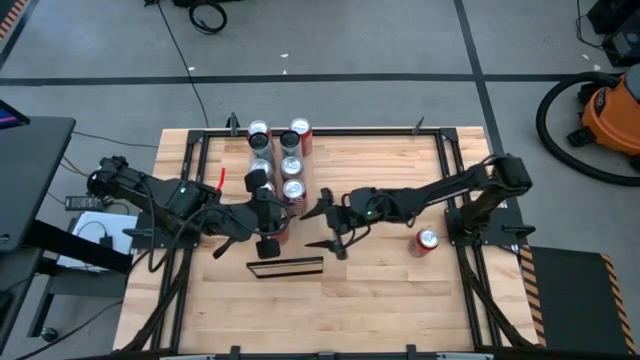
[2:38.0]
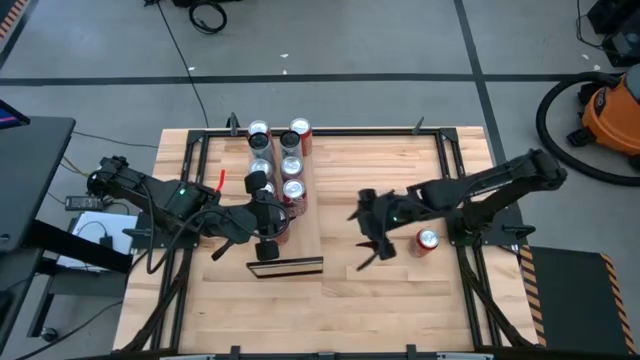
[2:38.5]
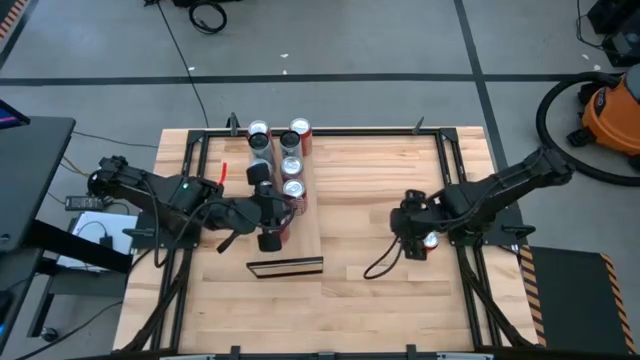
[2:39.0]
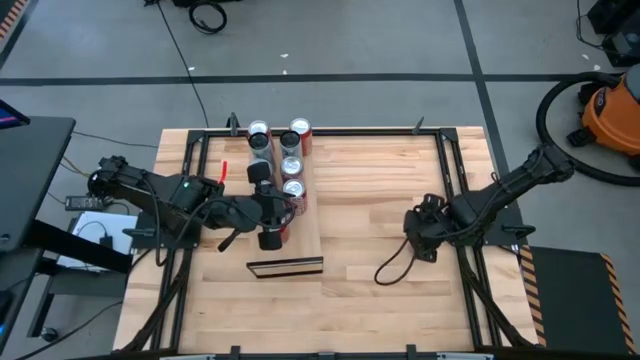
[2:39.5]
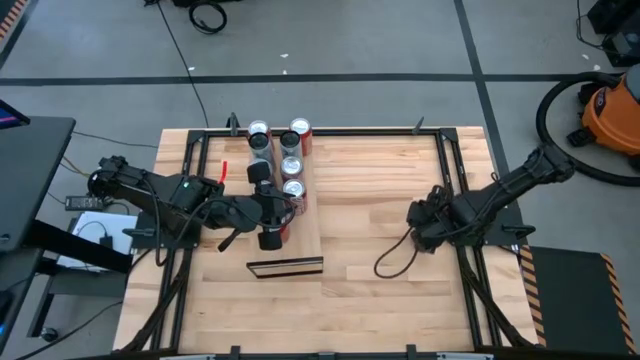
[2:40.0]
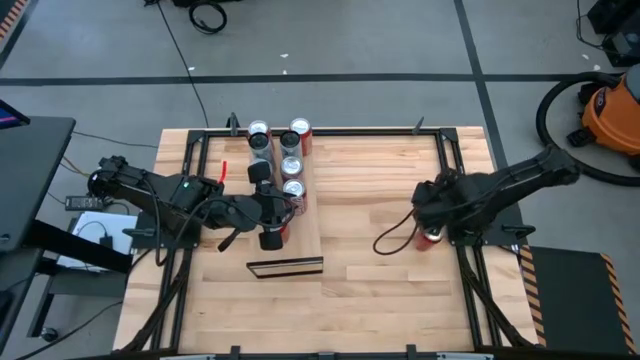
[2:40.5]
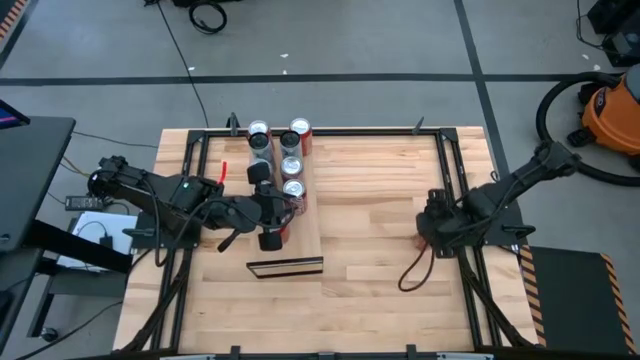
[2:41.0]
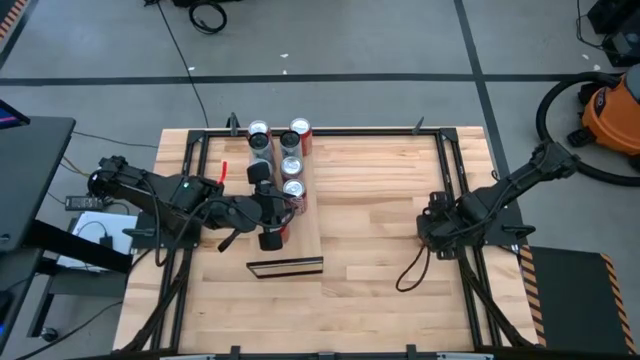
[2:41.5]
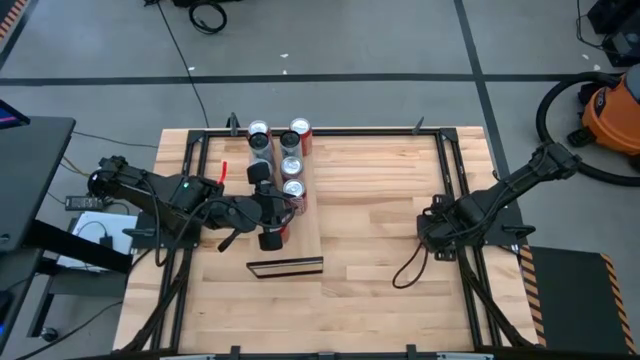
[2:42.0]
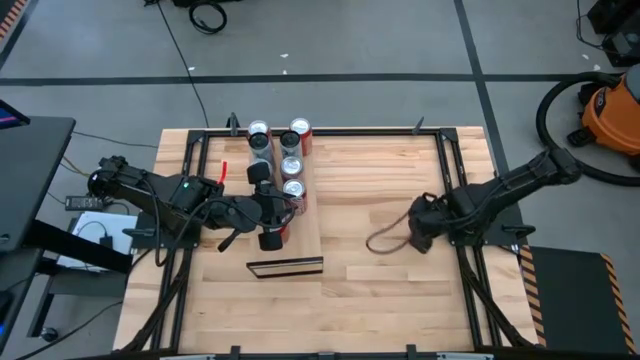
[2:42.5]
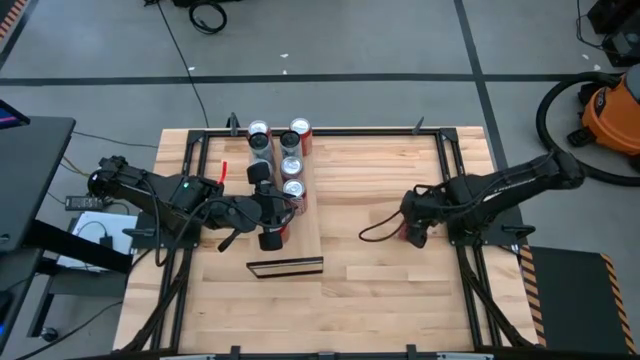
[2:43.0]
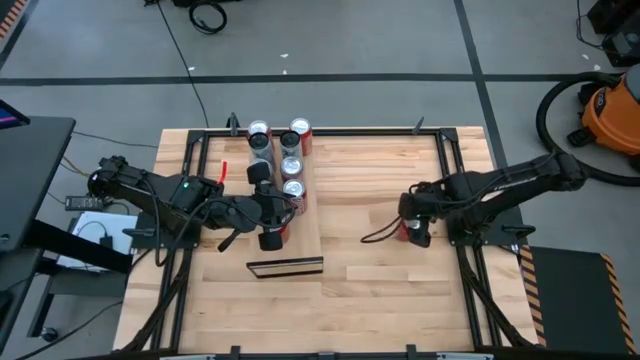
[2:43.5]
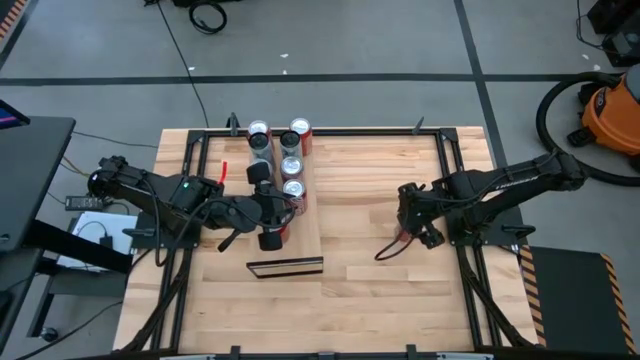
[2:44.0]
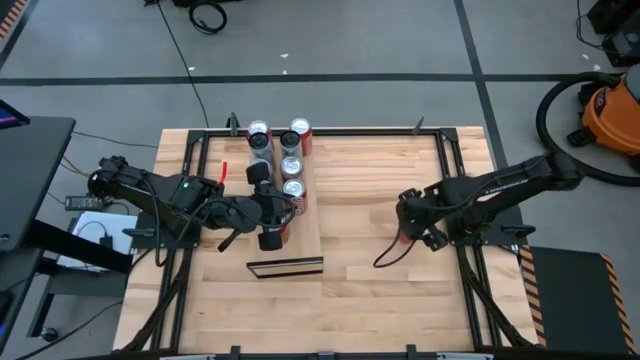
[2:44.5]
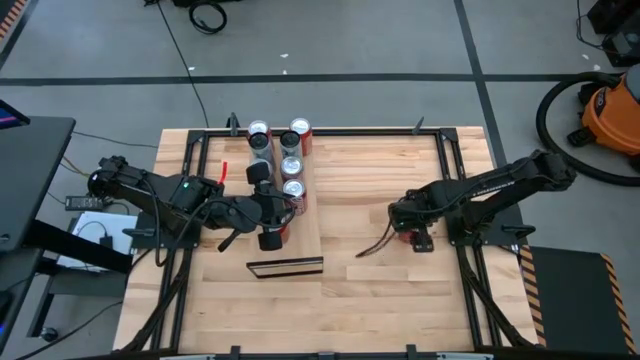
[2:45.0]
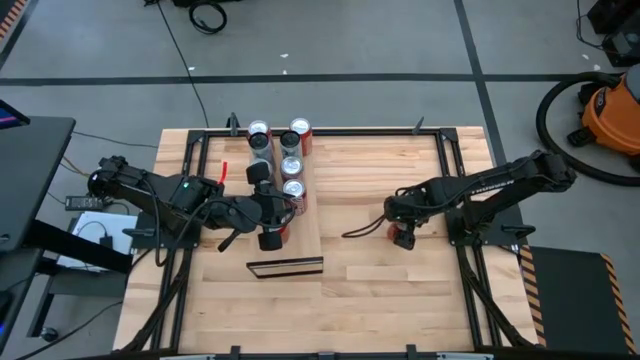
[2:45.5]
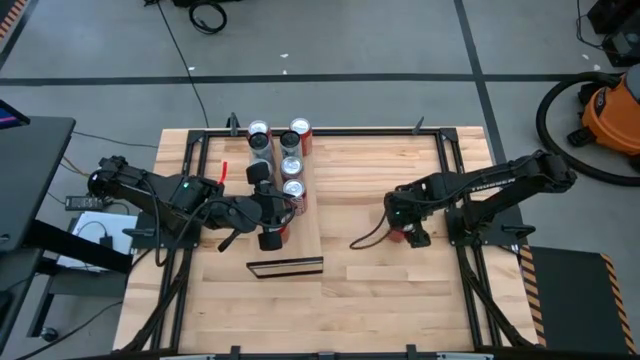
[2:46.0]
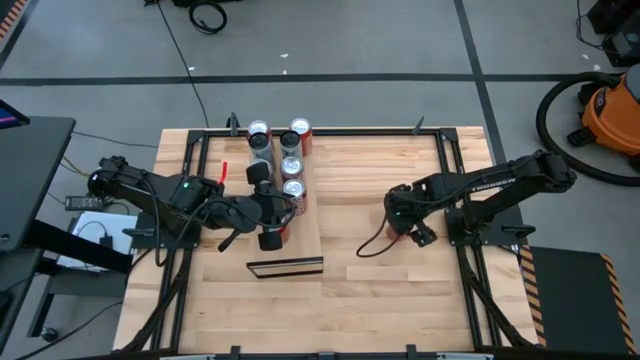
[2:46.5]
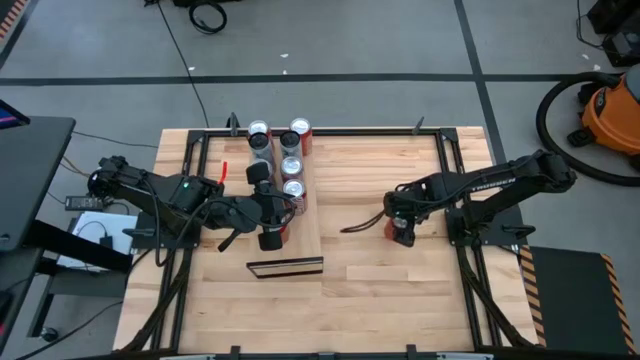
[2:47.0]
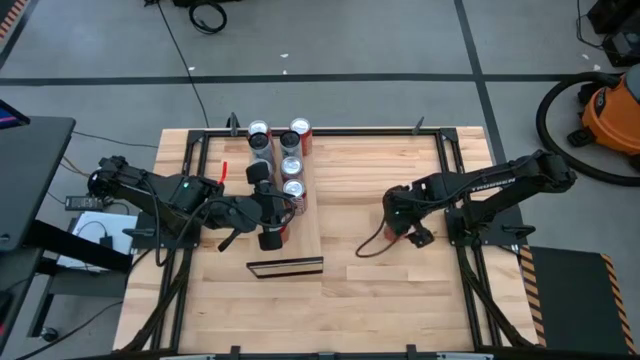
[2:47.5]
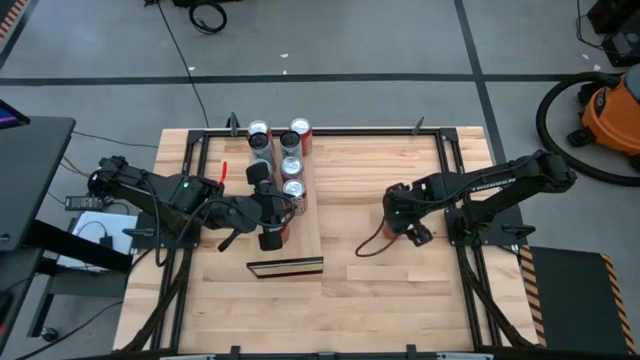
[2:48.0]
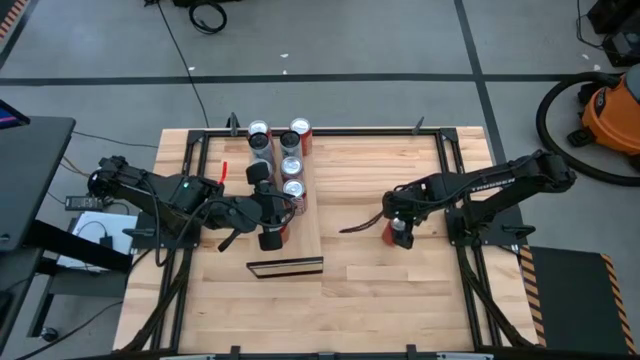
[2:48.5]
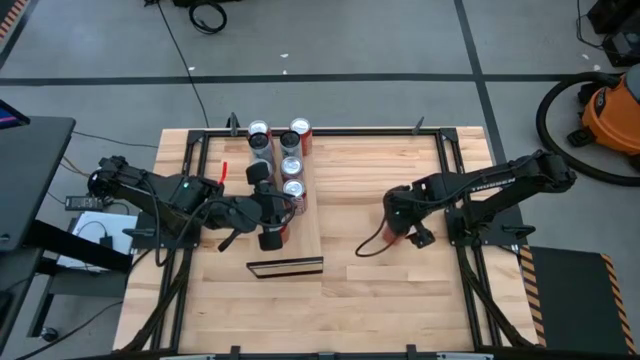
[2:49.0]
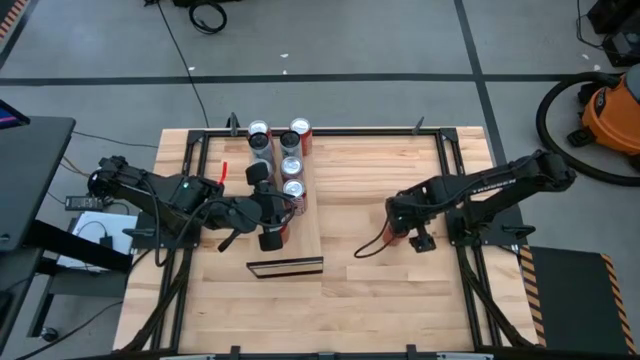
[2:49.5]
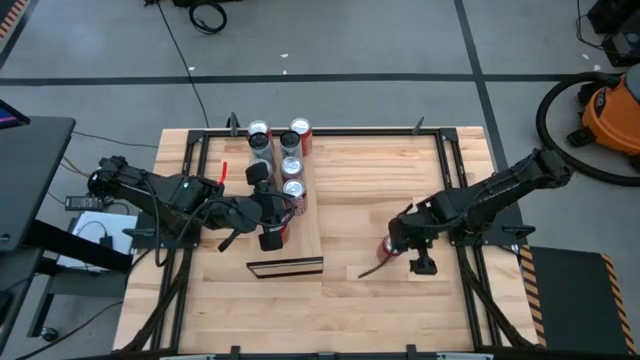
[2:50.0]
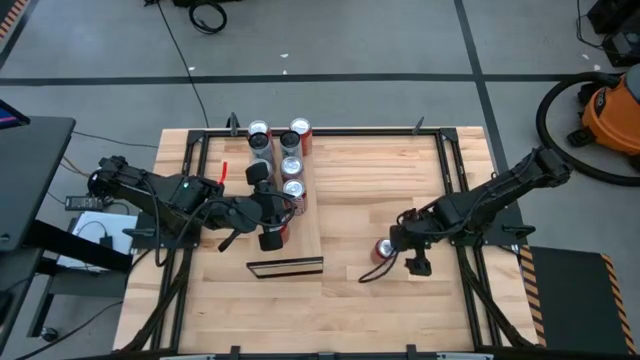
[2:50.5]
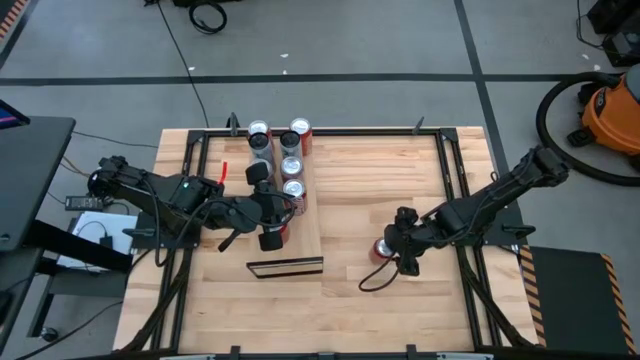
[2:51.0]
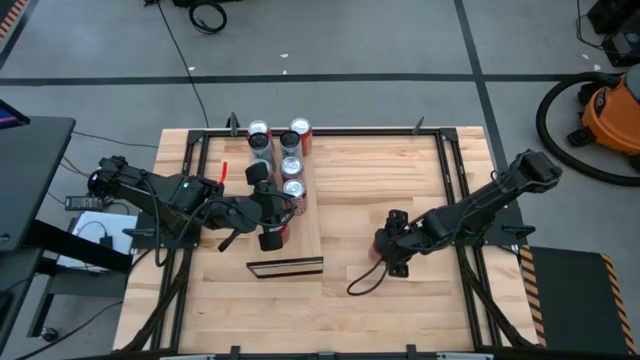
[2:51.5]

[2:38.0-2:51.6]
Task: Place canned beverage on shelf
Align the red and black soda can with the other red and black soda can on the shelf

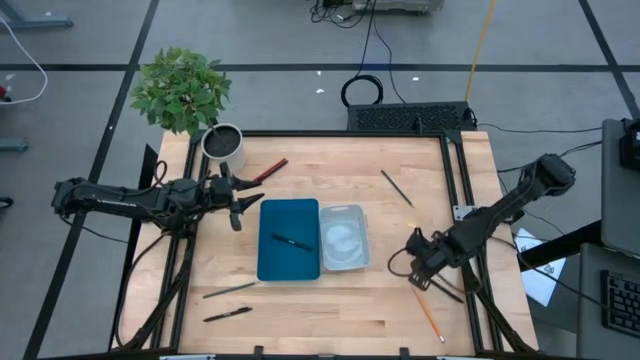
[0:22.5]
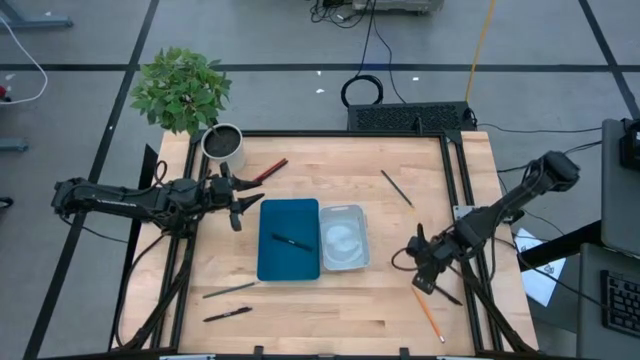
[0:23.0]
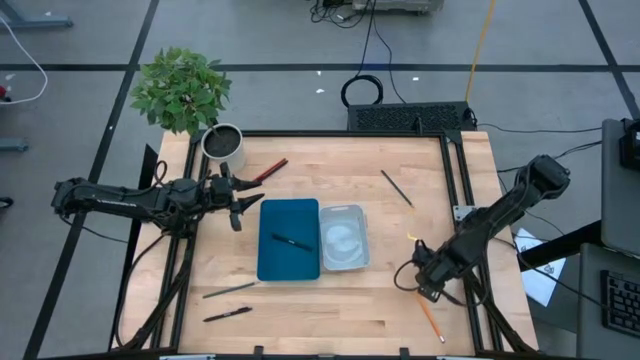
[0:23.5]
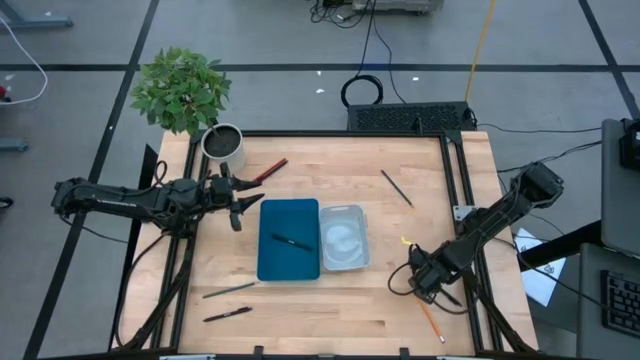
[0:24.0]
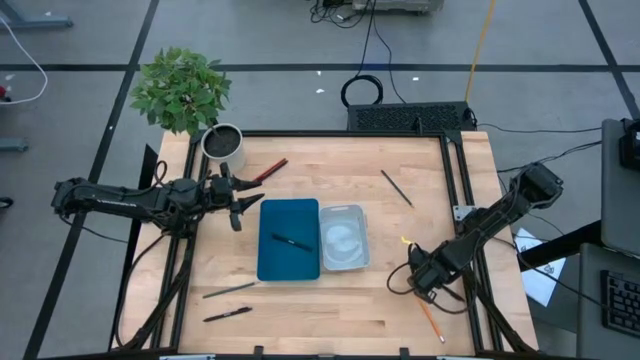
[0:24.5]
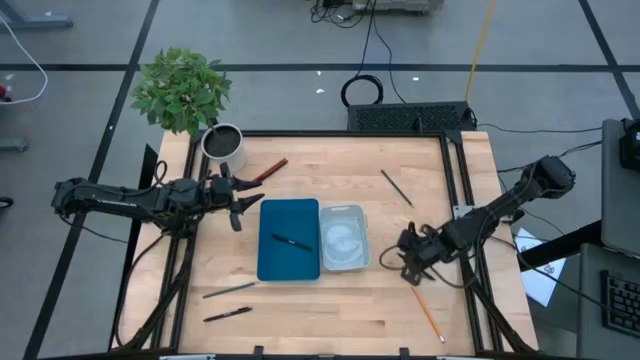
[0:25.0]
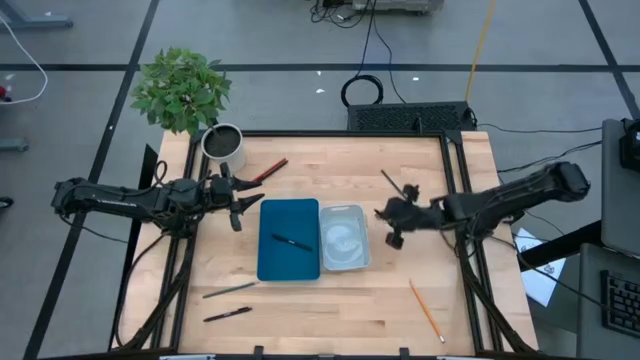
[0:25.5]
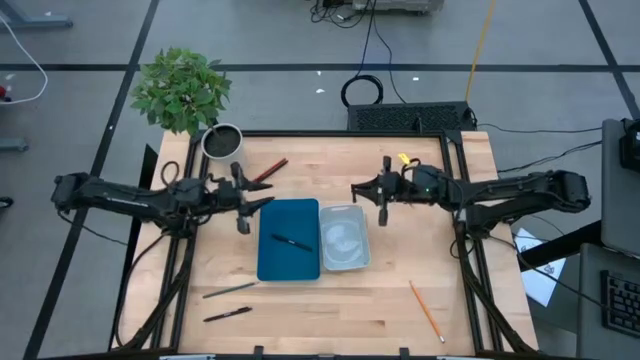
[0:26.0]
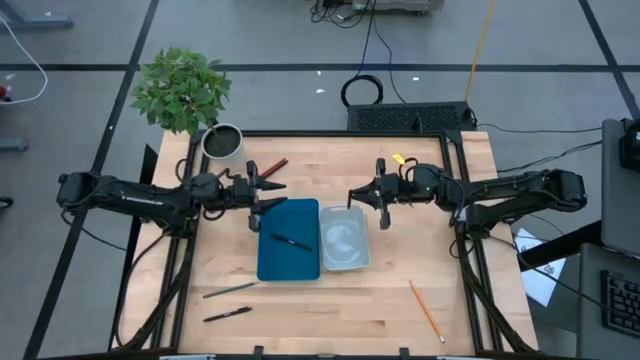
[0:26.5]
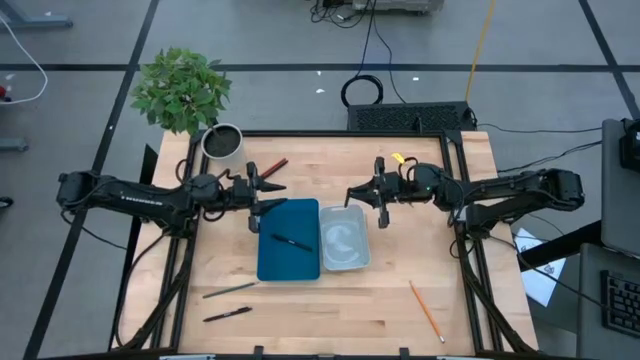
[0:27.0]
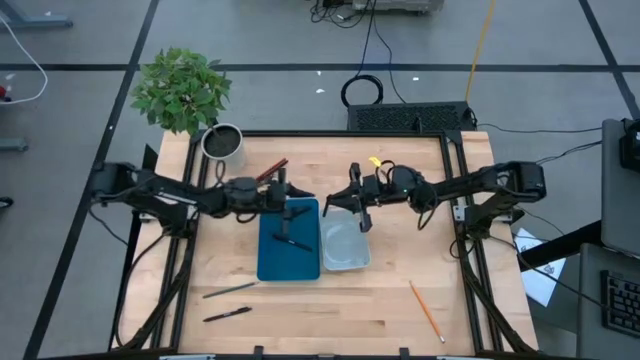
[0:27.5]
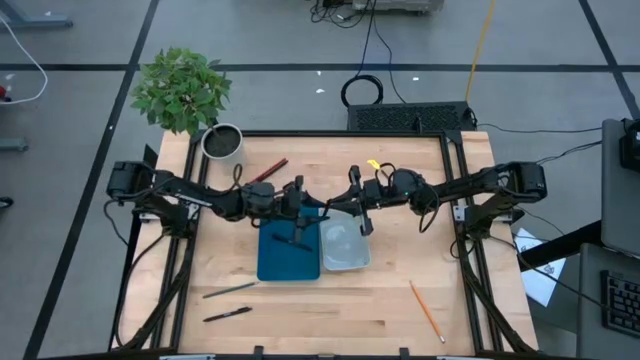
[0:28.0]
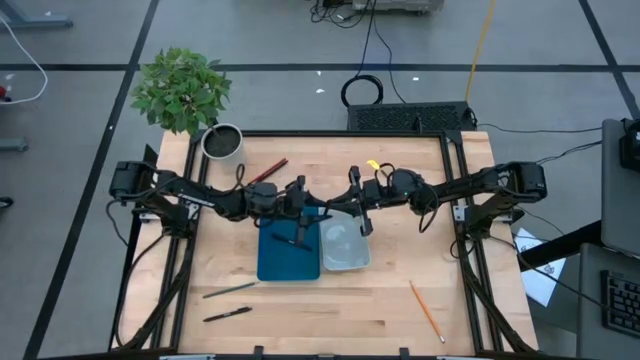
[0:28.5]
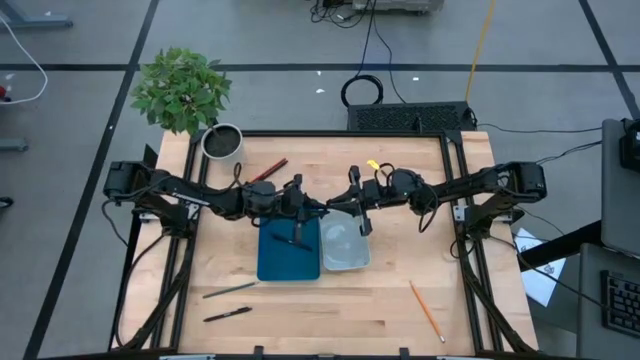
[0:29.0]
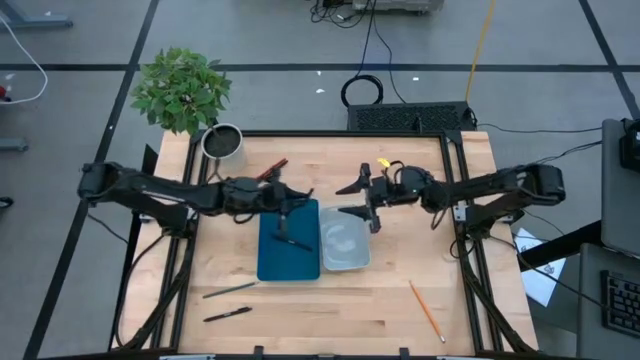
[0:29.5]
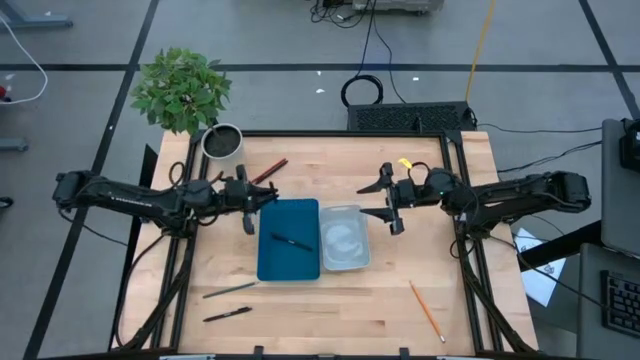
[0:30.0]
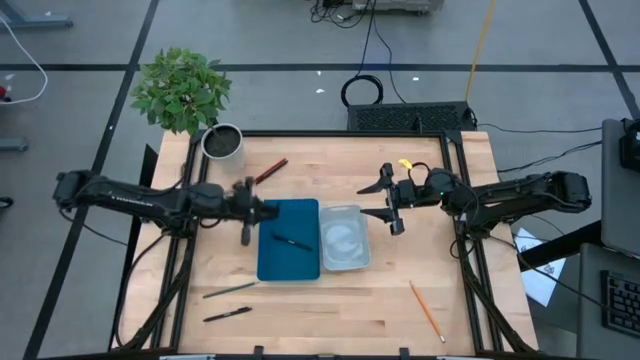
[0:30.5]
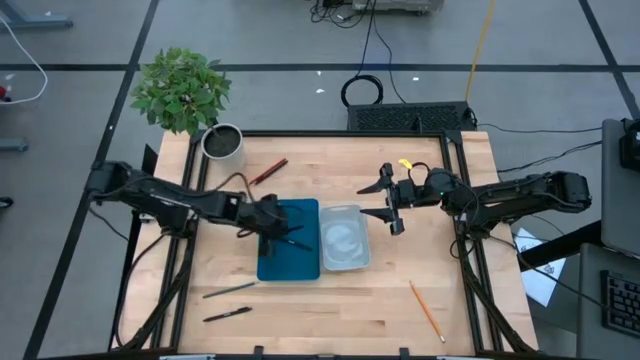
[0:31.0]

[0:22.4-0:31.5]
Task: Sort pens & pencils
Put the bottom right black pen into the blue bin
